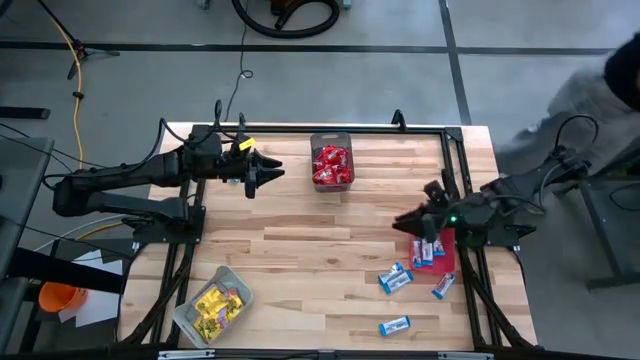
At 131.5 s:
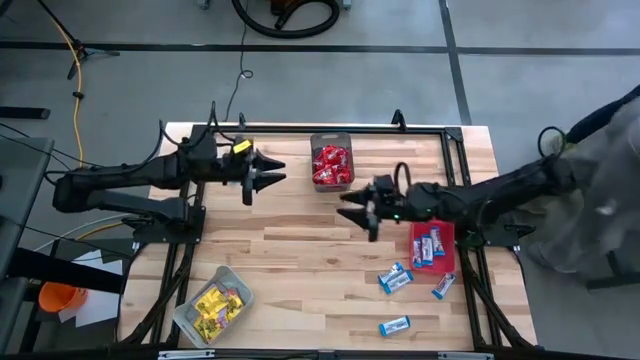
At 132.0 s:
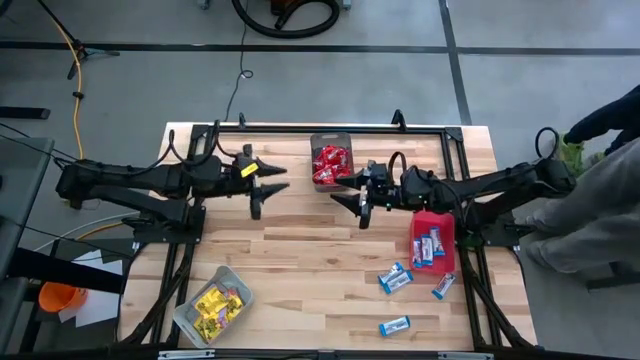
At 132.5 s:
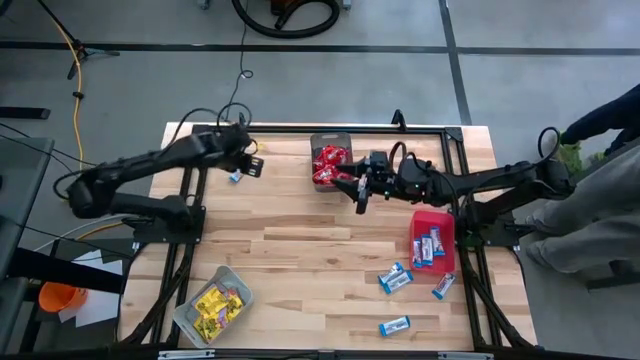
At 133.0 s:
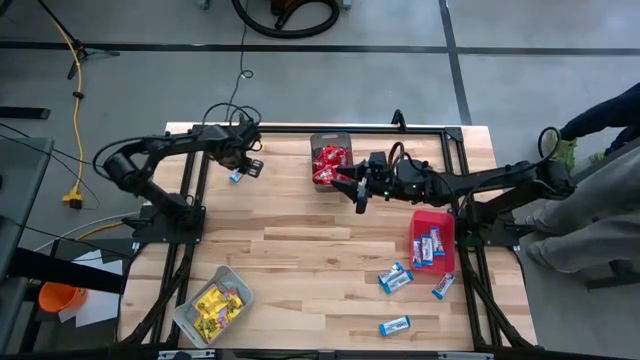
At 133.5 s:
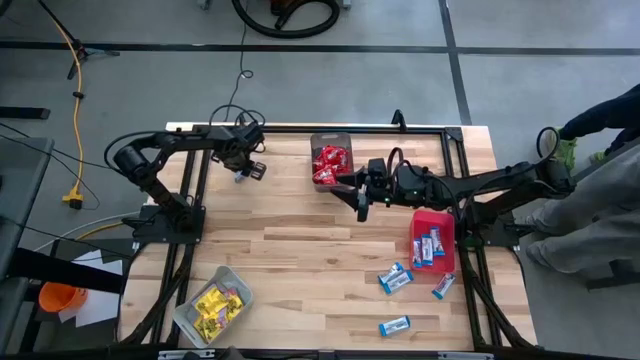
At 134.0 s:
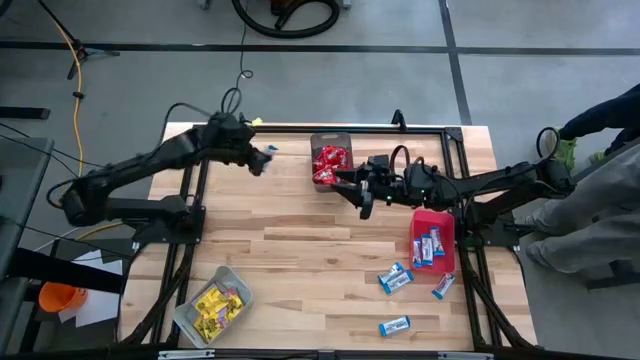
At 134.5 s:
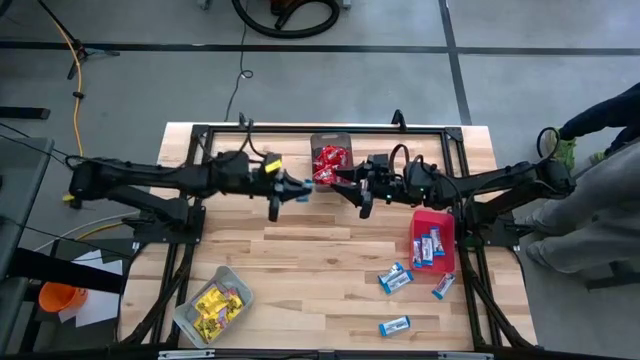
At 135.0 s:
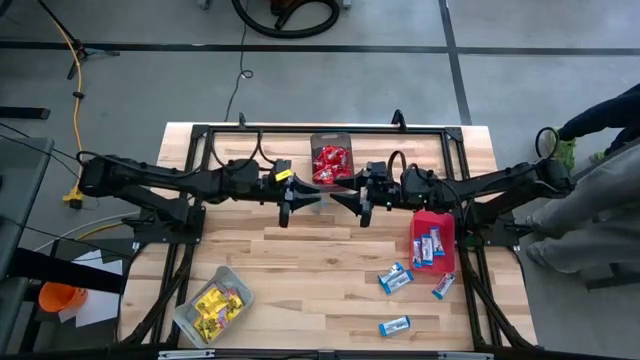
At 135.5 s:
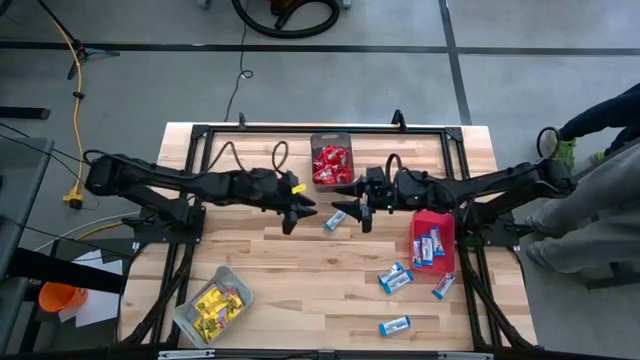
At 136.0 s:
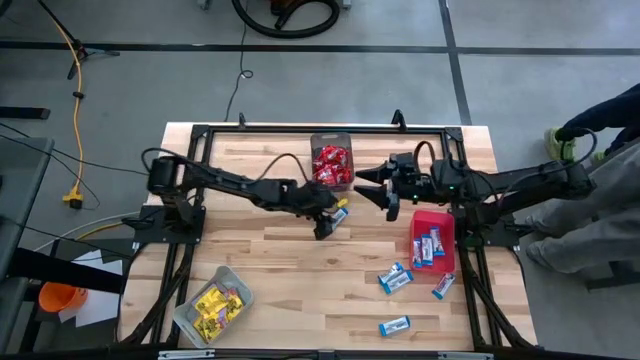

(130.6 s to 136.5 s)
Task: Sort candy
Put the white chocolate candy into the red bin

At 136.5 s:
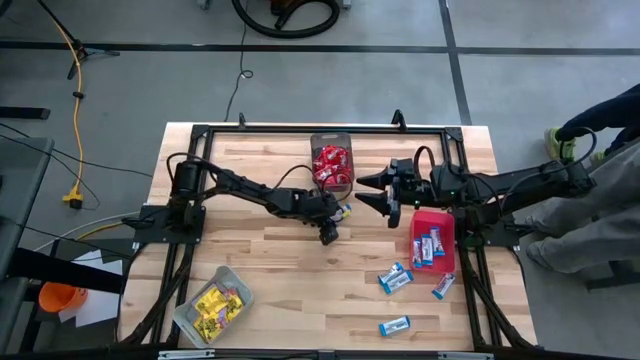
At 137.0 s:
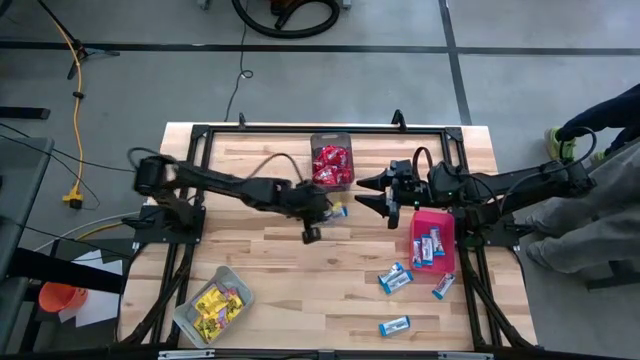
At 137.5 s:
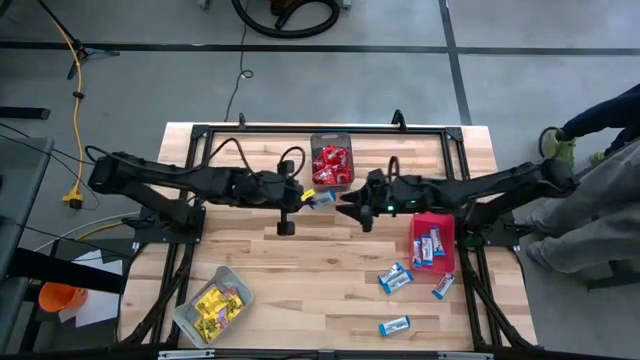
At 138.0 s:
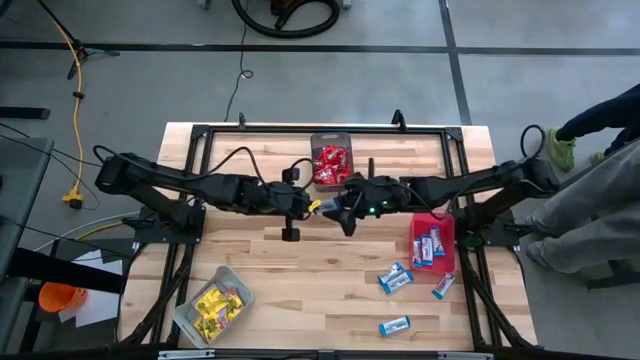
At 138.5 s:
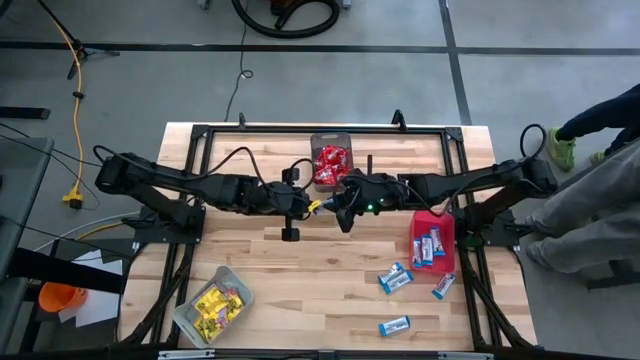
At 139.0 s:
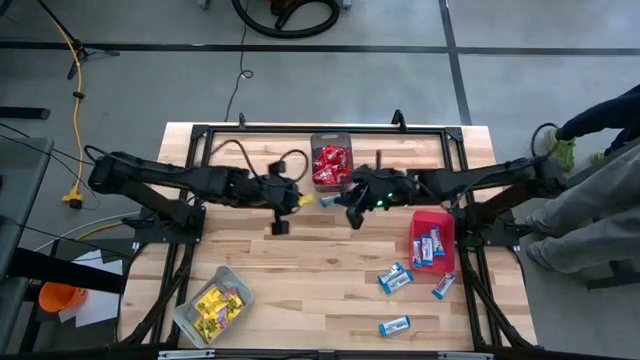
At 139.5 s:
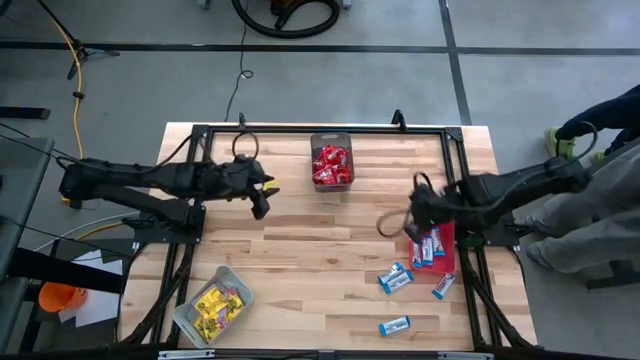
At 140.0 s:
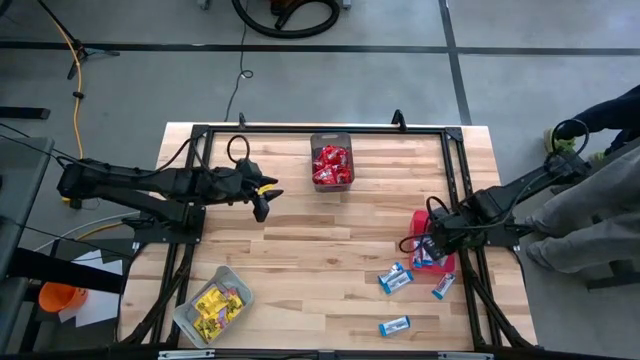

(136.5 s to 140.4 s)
Put the white chocolate candy into the red bin

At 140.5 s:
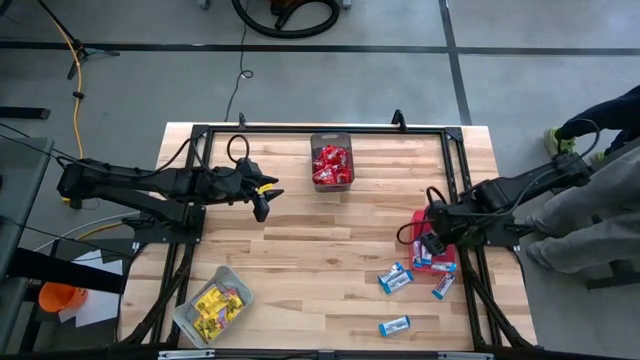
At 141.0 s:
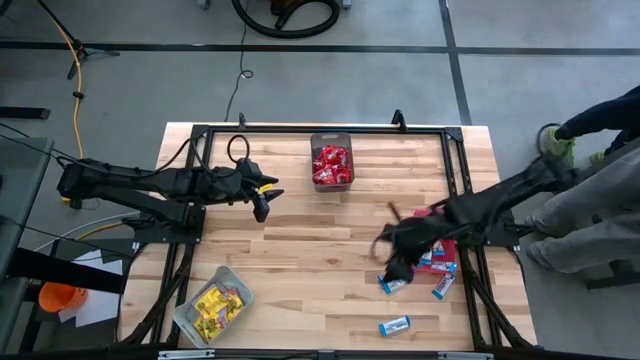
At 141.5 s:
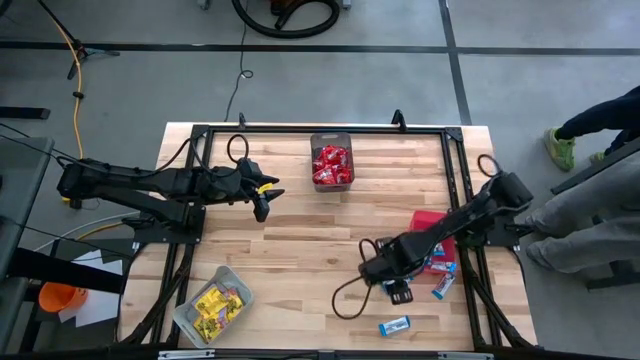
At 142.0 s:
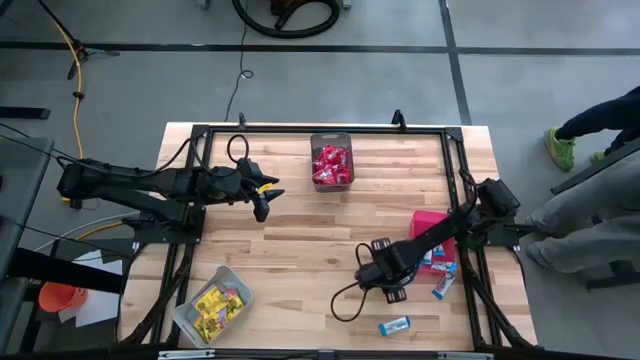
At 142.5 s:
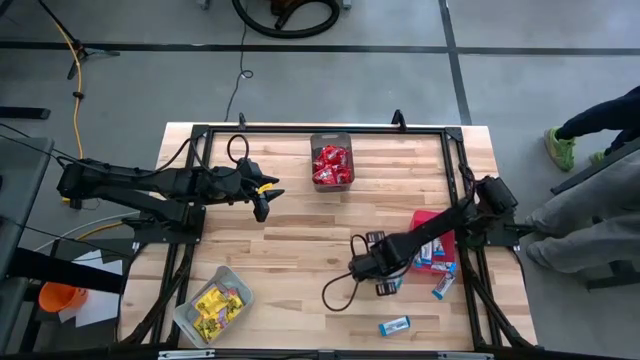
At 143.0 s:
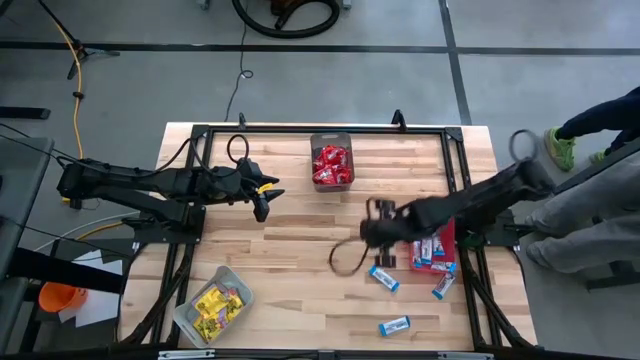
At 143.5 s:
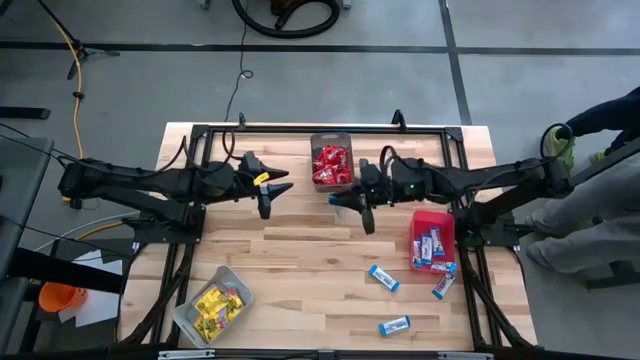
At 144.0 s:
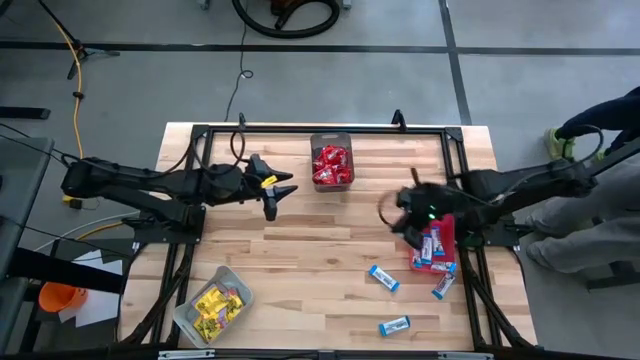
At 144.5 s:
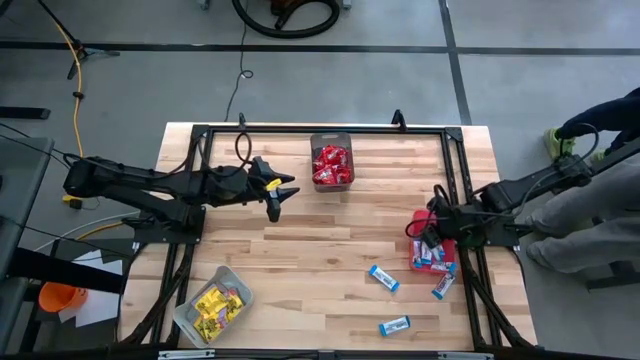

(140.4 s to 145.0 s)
Put the white chocolate candy into the red bin

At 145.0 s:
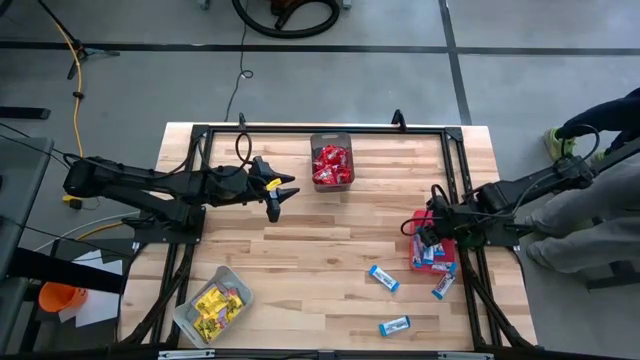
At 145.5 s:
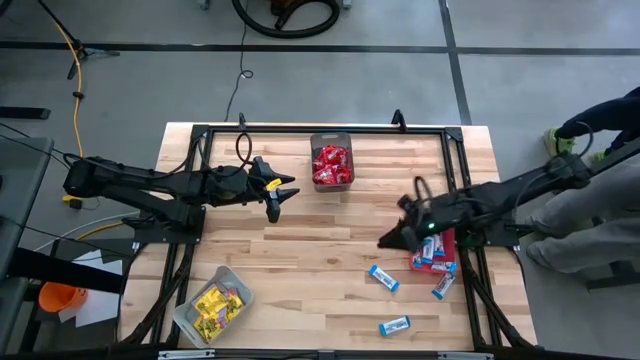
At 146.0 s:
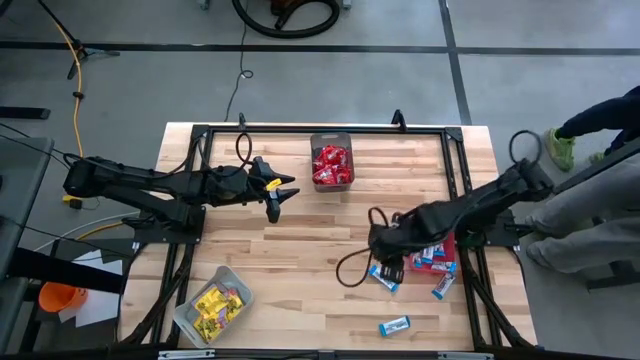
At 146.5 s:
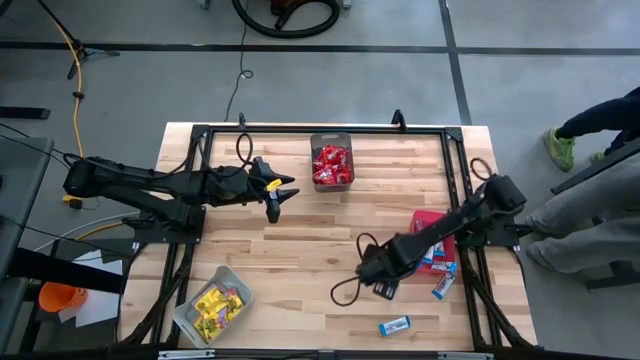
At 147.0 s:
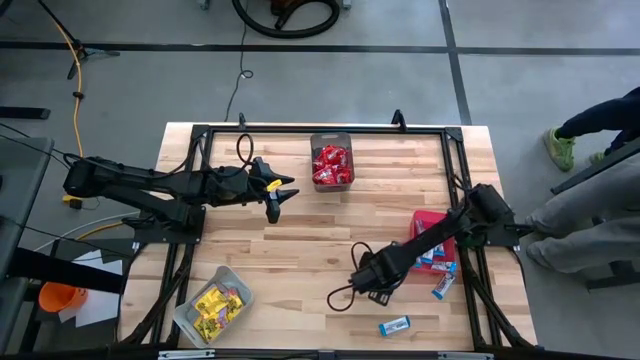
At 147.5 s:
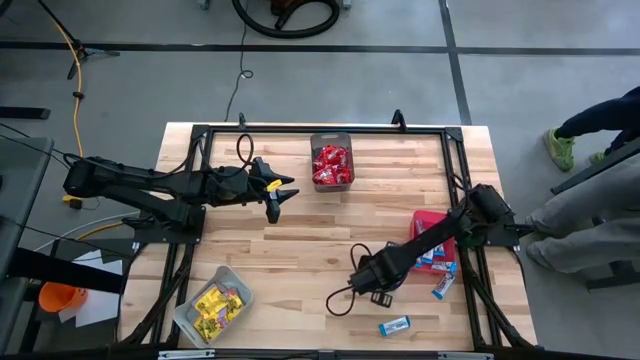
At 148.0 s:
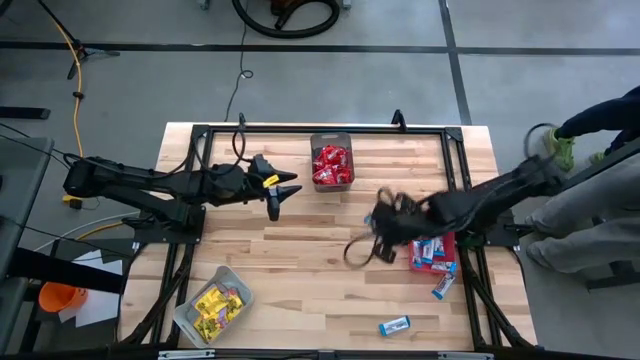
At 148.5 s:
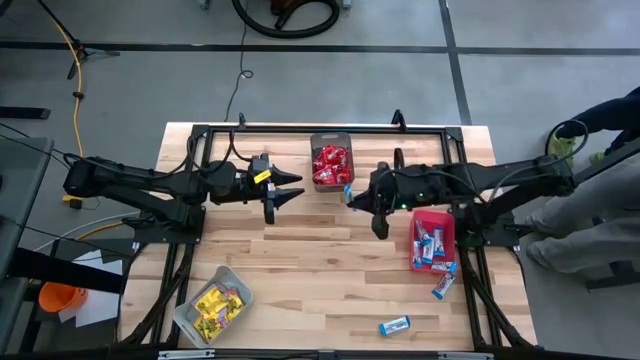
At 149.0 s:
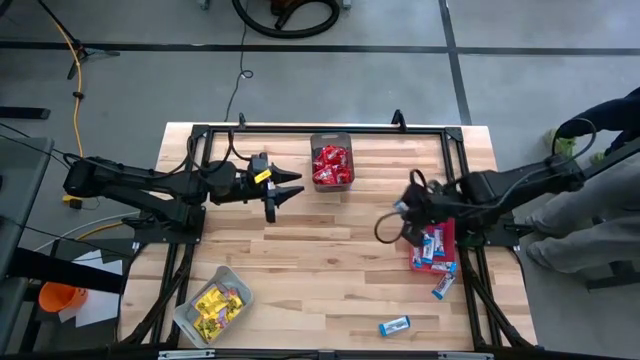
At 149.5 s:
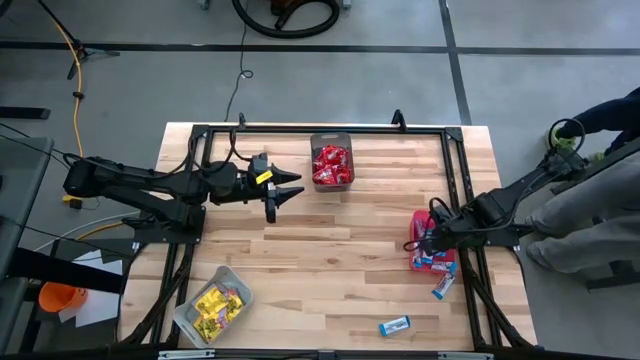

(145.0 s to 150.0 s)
Put the white chocolate candy into the red bin

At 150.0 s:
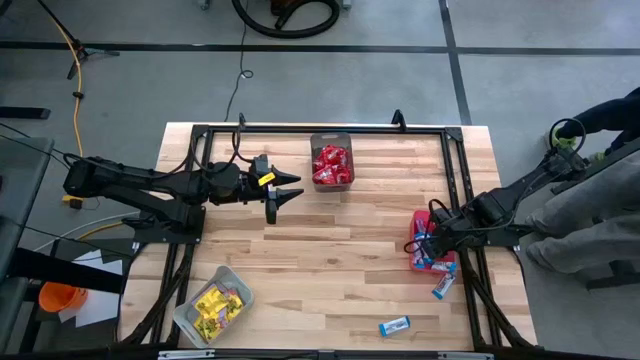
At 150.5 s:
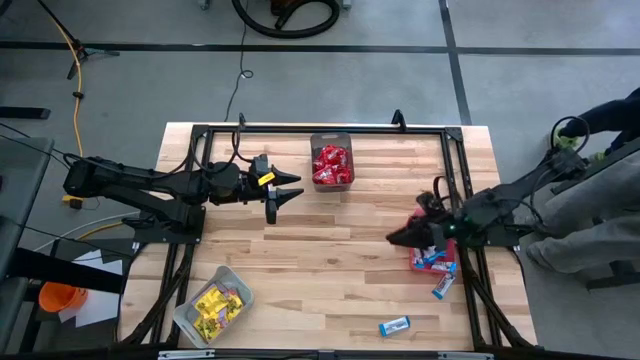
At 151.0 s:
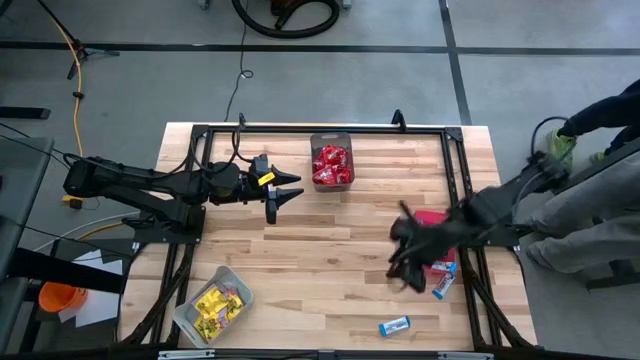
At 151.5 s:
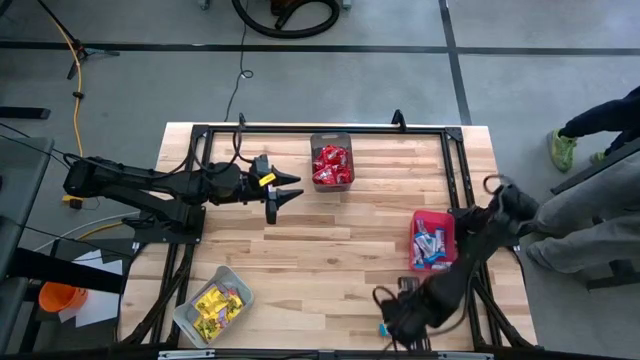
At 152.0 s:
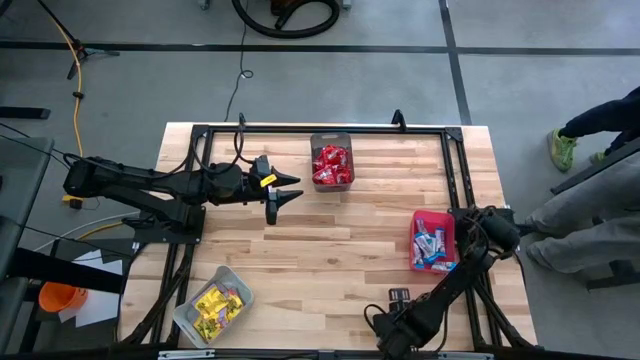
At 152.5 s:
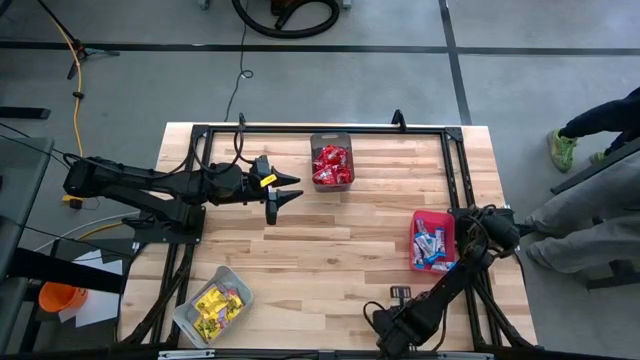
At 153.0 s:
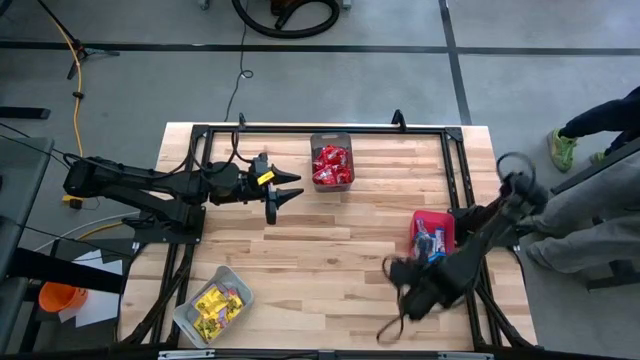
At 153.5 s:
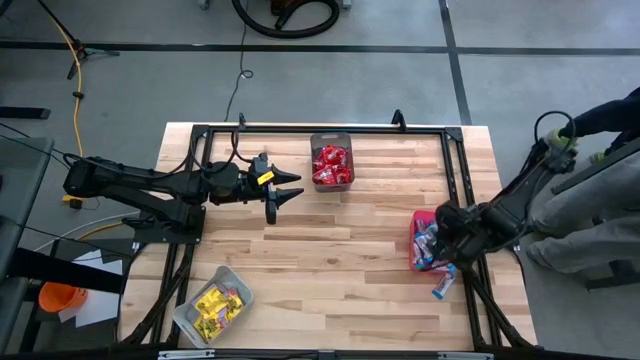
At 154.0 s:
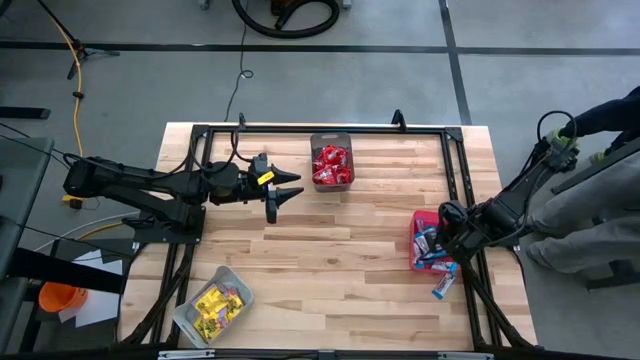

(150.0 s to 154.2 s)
Put the white chocolate candy into the red bin
